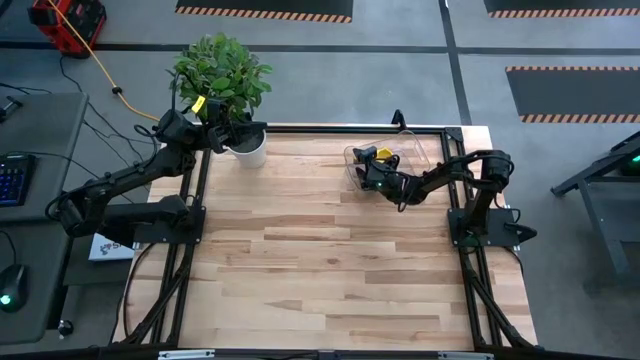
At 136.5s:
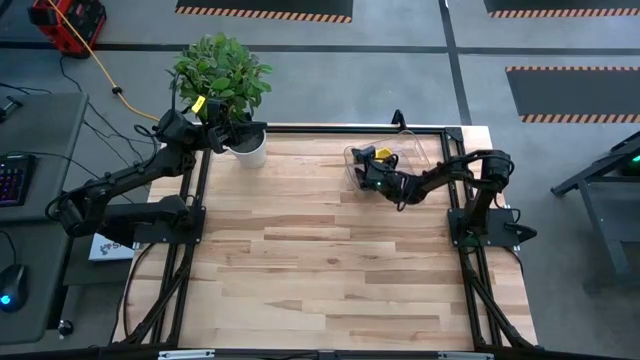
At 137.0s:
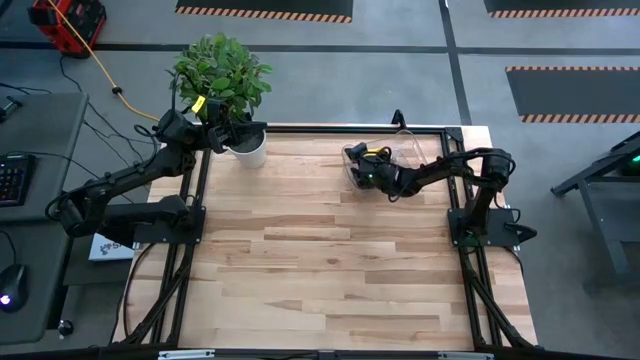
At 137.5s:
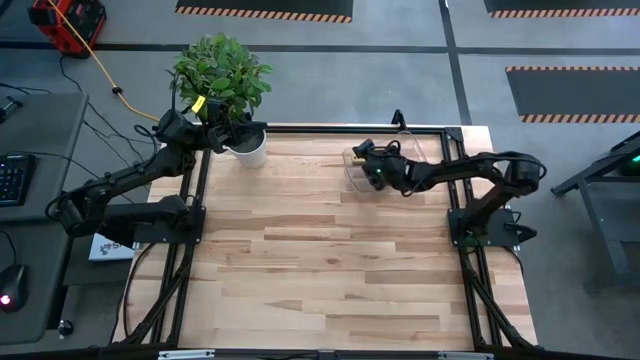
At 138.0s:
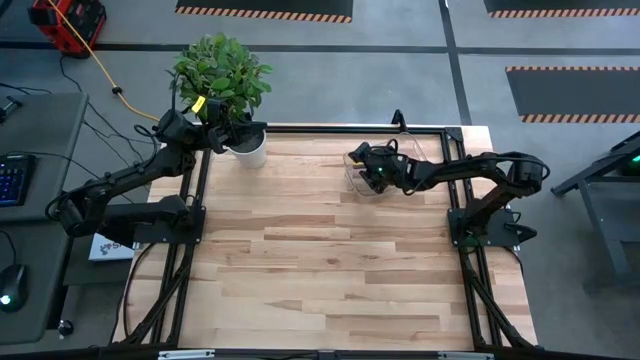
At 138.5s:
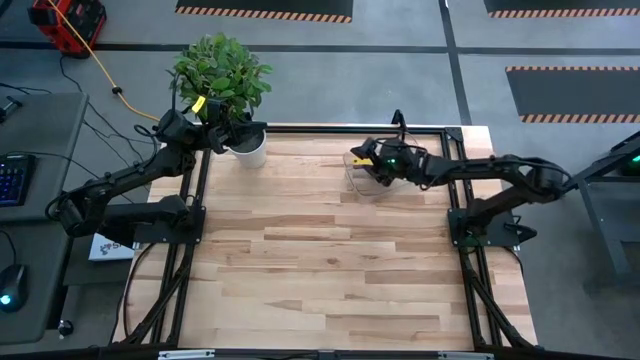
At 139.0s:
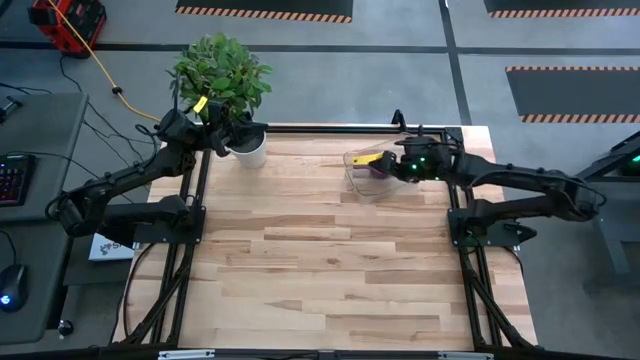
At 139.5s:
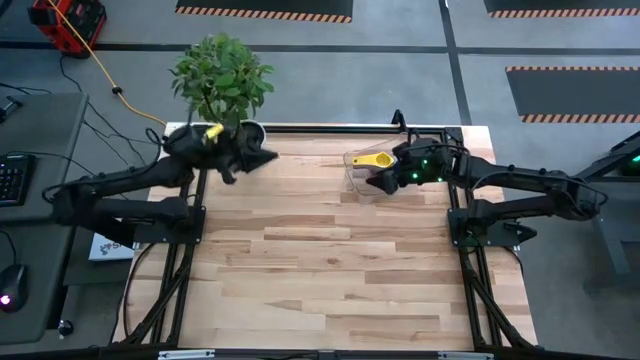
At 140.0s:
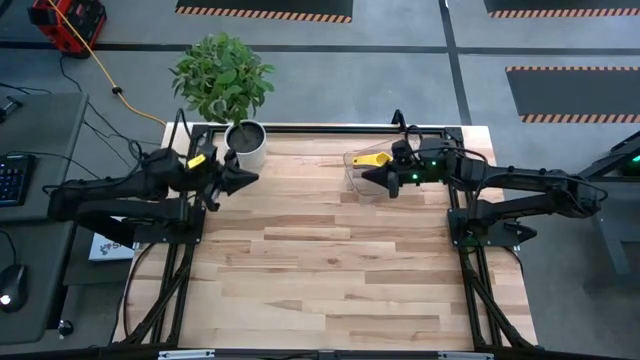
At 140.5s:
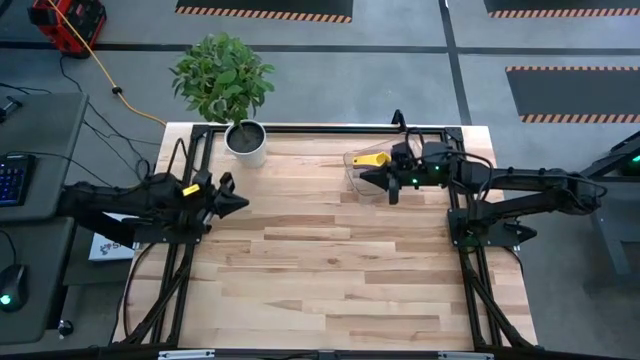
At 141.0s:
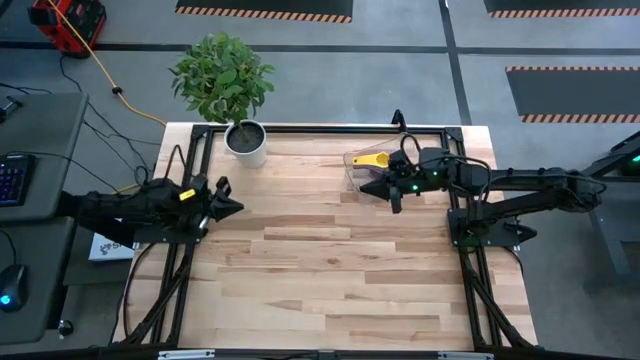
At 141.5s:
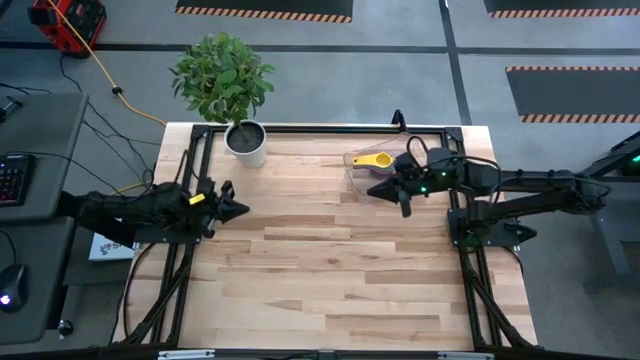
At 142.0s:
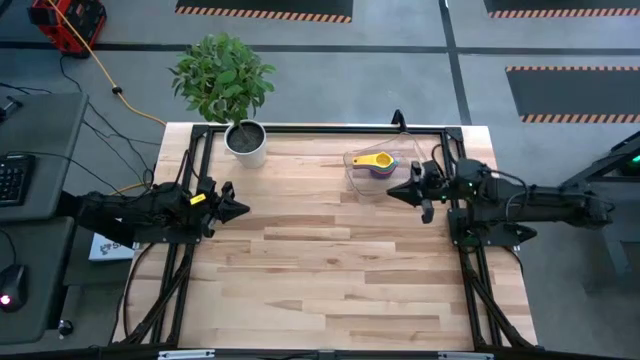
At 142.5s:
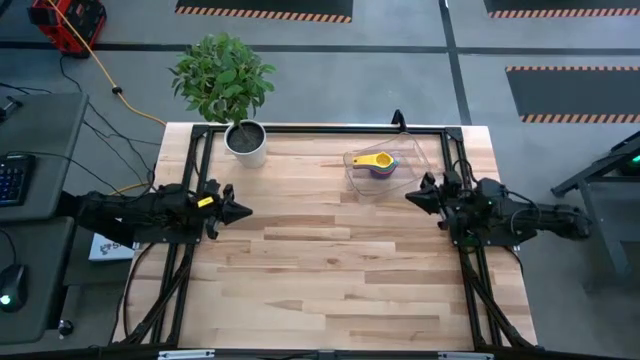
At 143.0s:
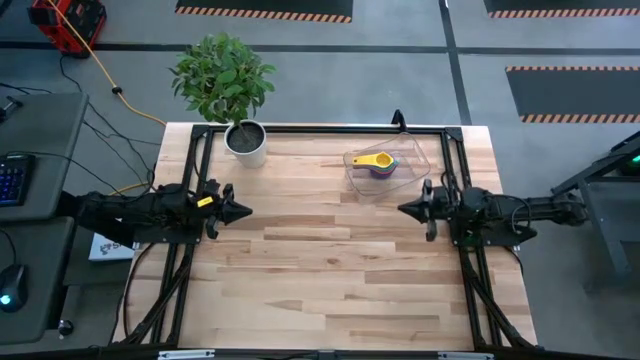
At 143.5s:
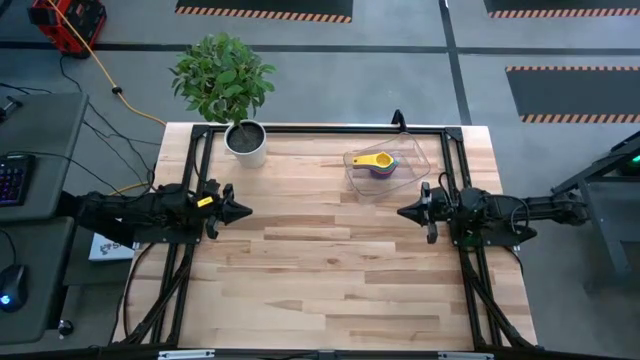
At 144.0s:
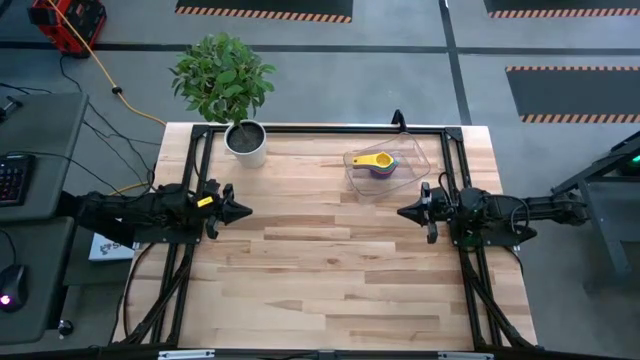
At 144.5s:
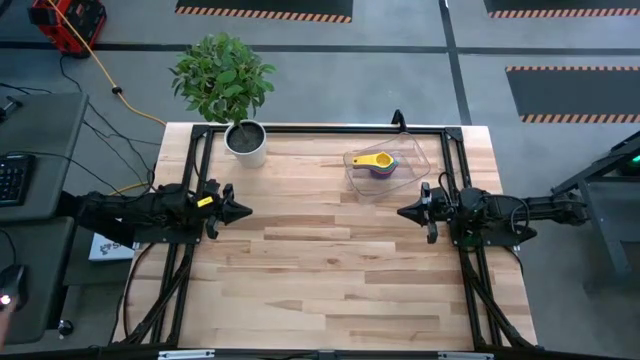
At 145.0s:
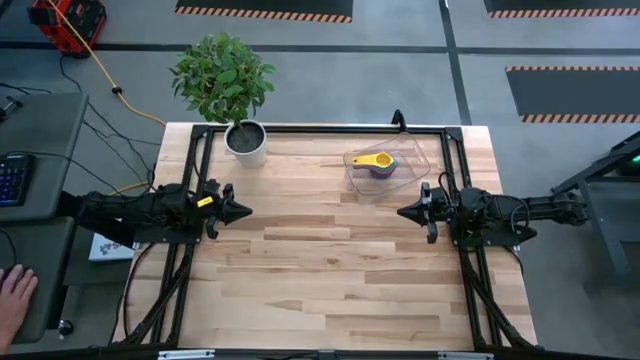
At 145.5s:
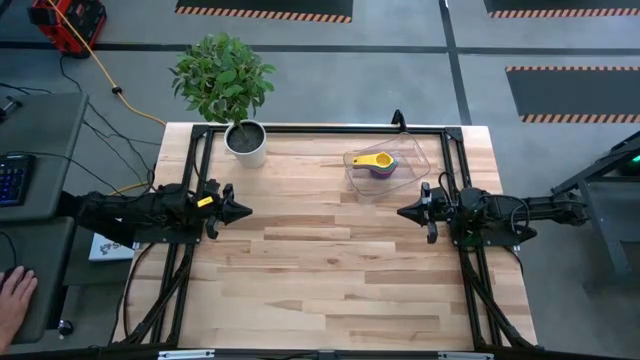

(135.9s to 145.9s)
Task: Nest measuring cups in basket
Return to Home Position

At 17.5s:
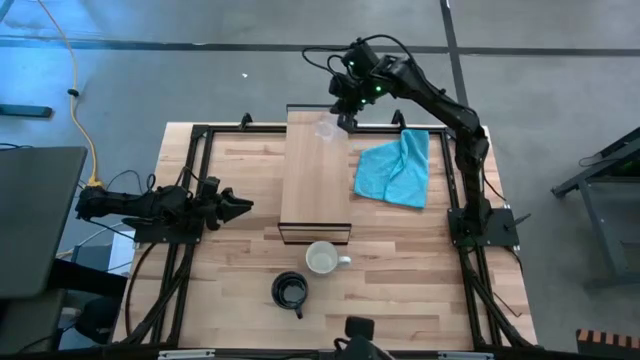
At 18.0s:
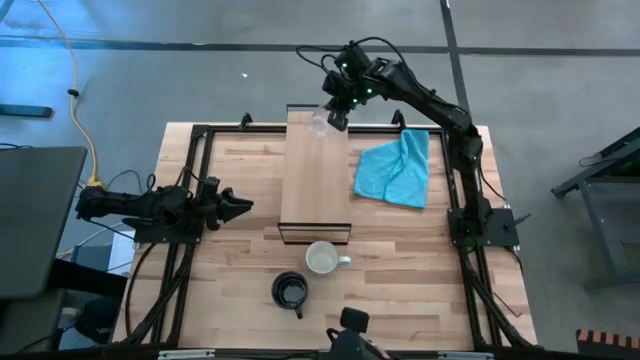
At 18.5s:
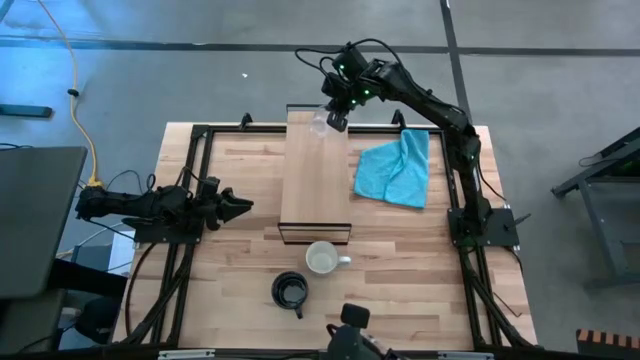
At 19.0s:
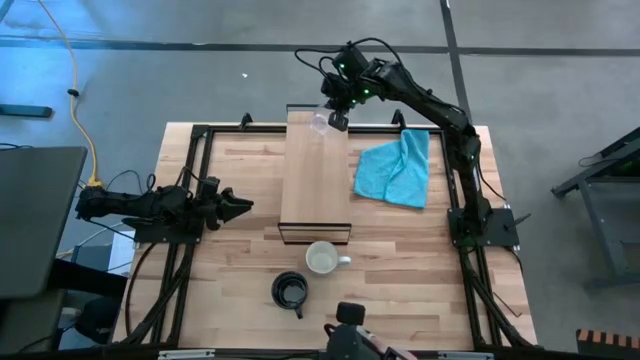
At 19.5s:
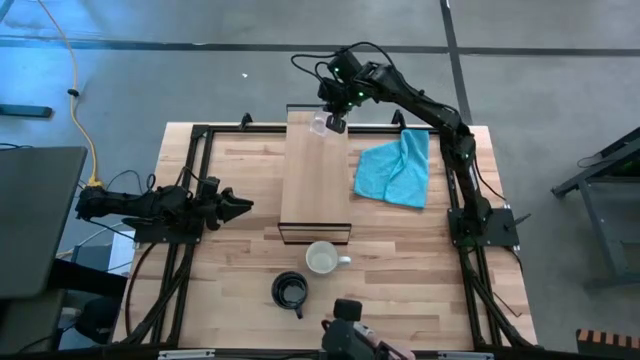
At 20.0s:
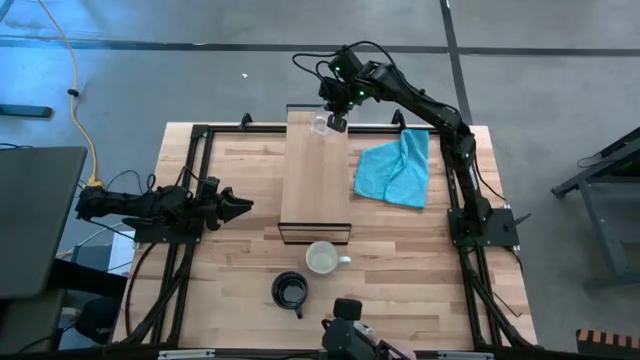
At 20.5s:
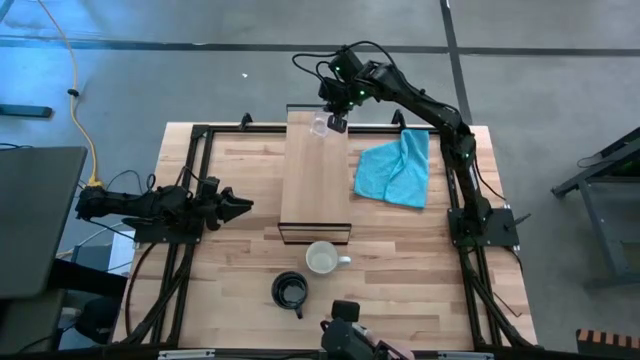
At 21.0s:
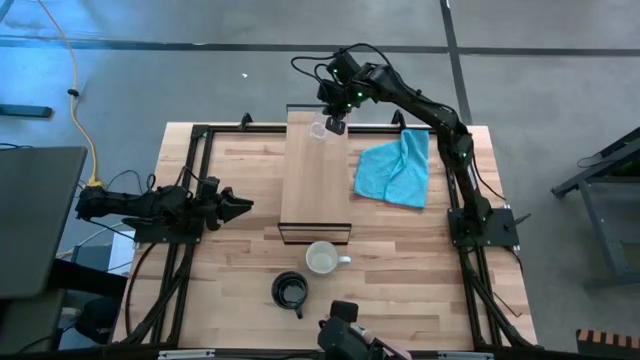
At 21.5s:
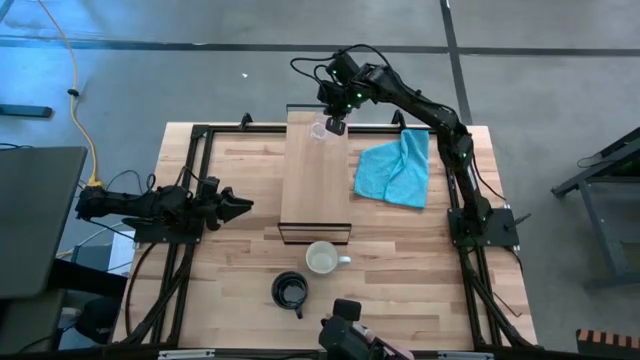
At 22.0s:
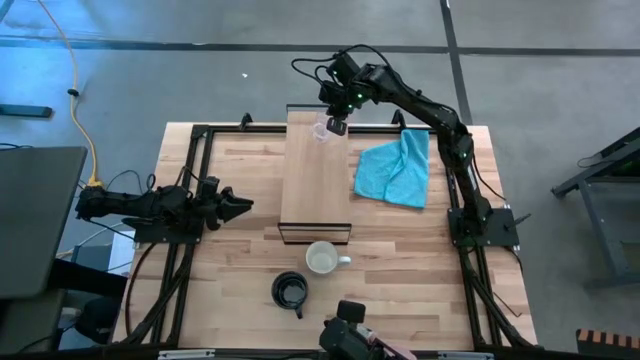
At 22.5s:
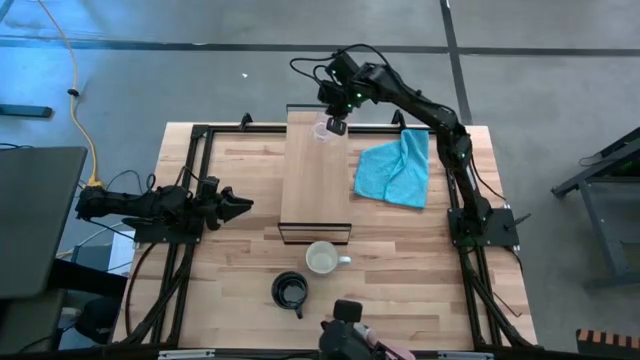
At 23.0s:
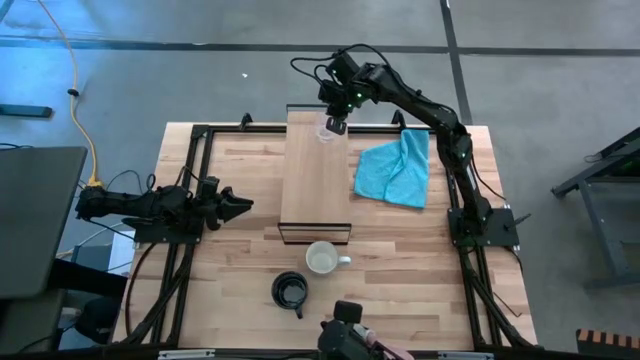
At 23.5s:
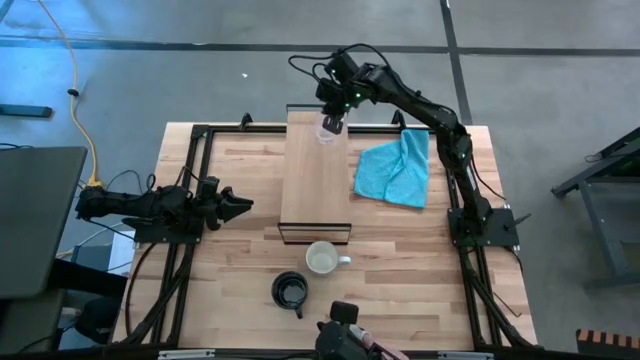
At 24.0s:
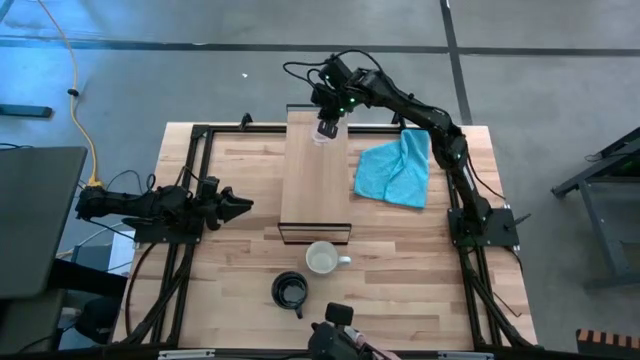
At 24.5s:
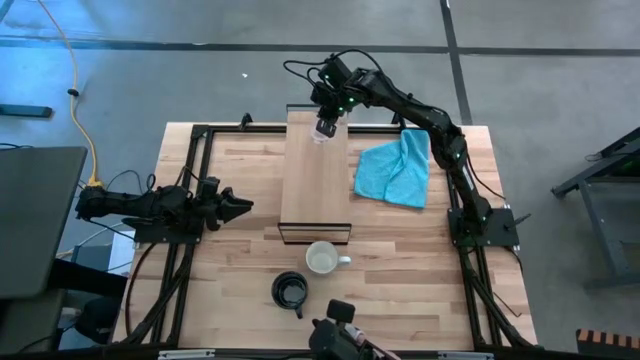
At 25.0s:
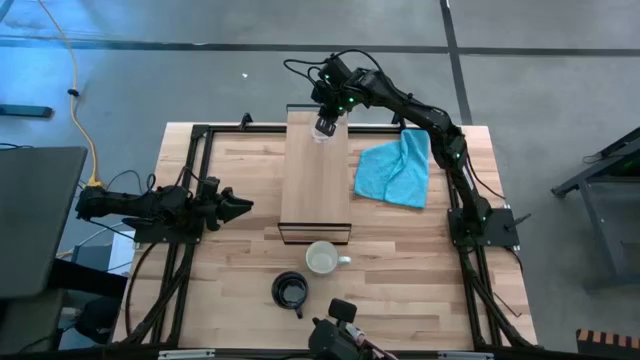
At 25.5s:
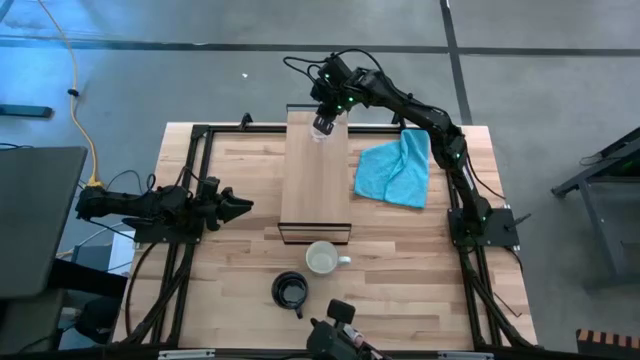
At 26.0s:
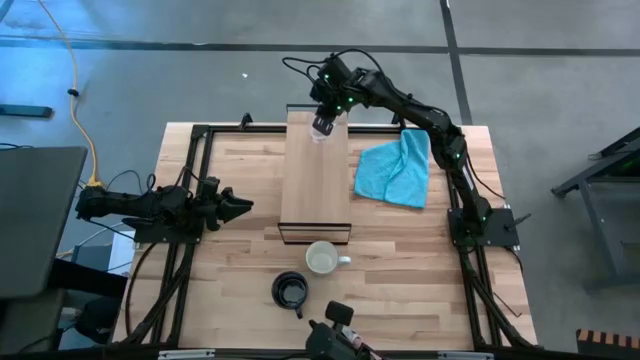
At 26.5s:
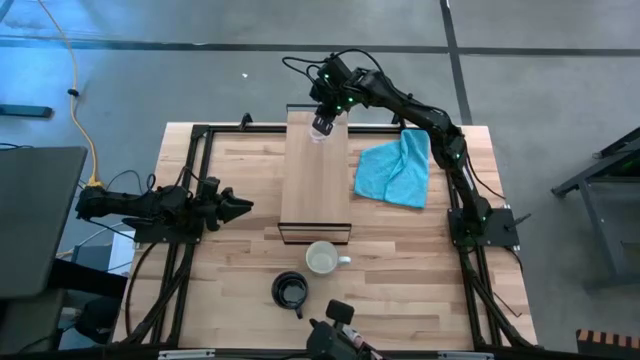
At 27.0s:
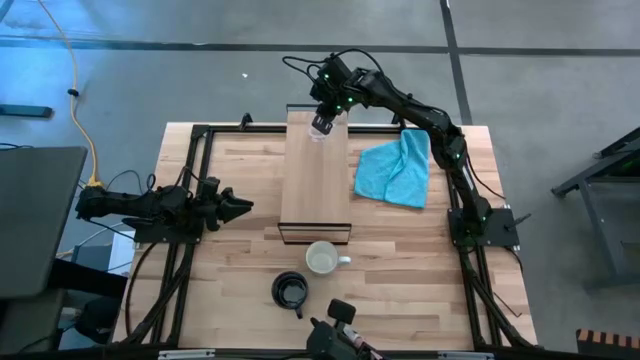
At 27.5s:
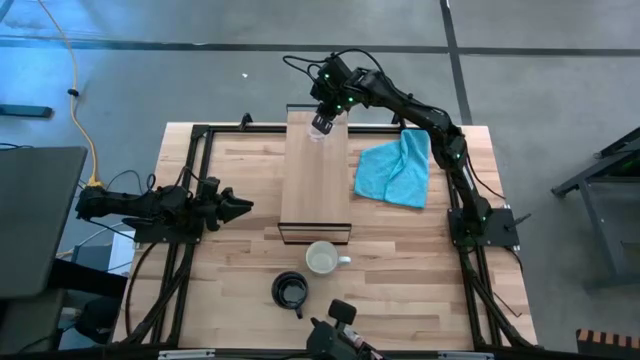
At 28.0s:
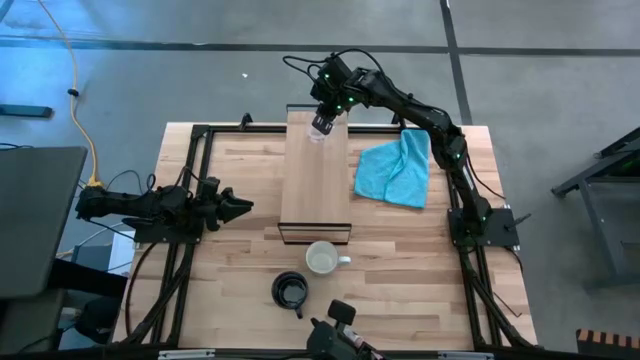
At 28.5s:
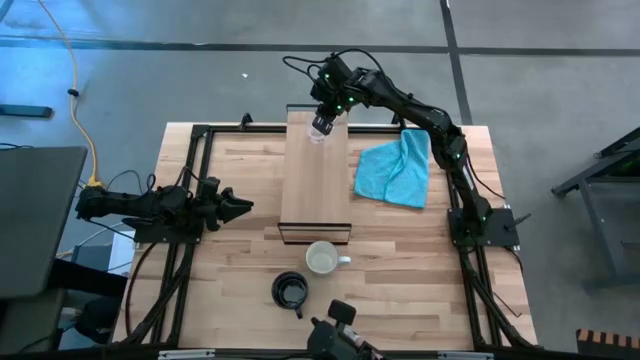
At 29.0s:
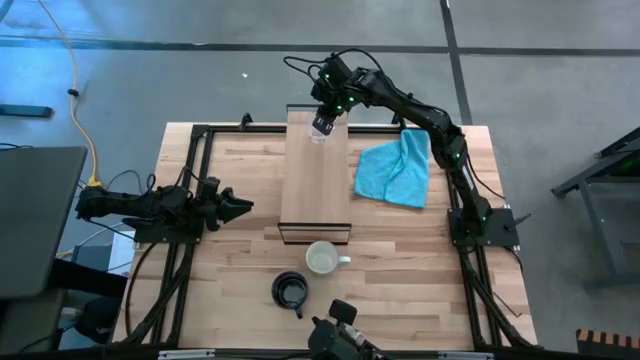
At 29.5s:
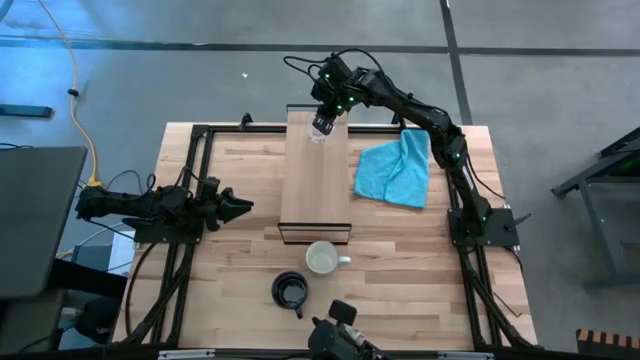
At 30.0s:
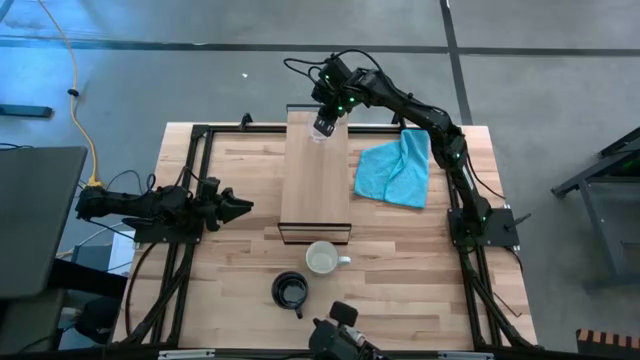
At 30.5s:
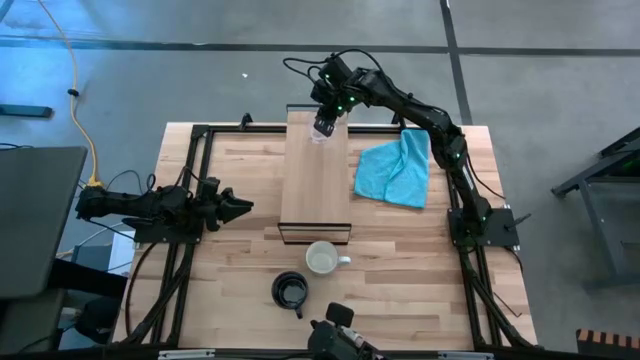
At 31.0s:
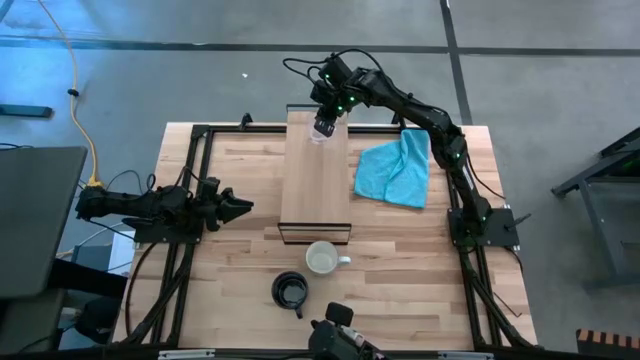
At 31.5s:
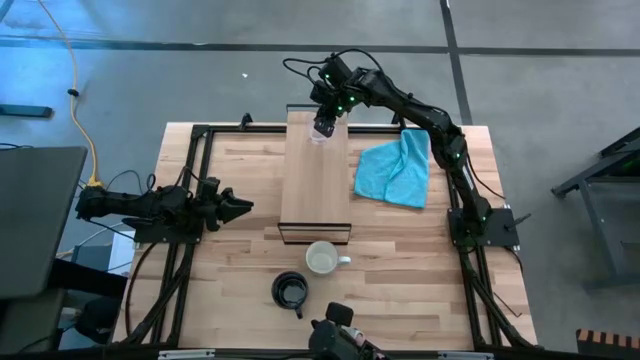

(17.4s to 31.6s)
Task: Stack small to large cups/mugs on shelf
Put the transparent mug on the shelf
